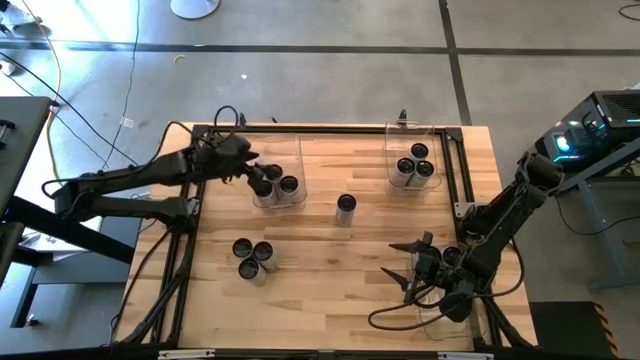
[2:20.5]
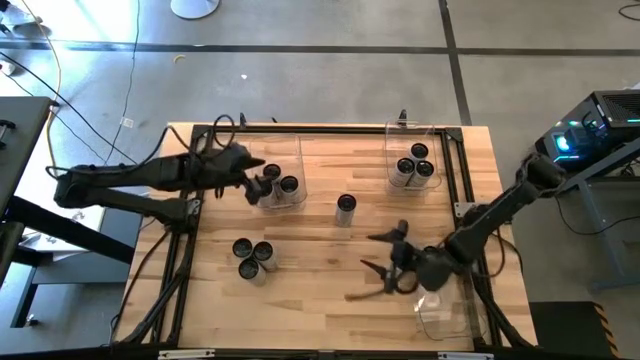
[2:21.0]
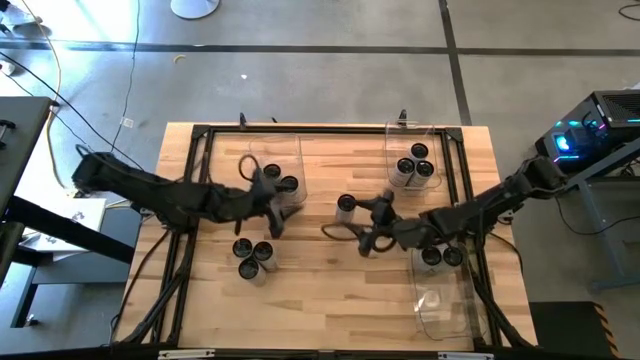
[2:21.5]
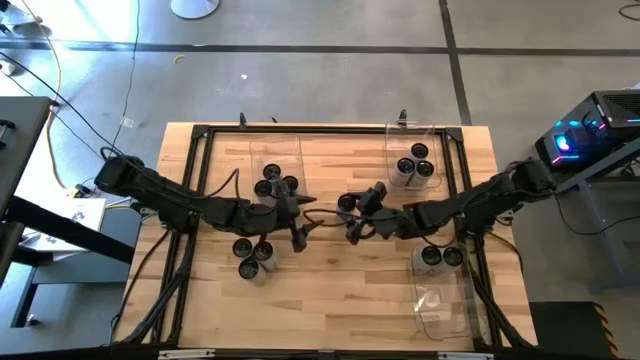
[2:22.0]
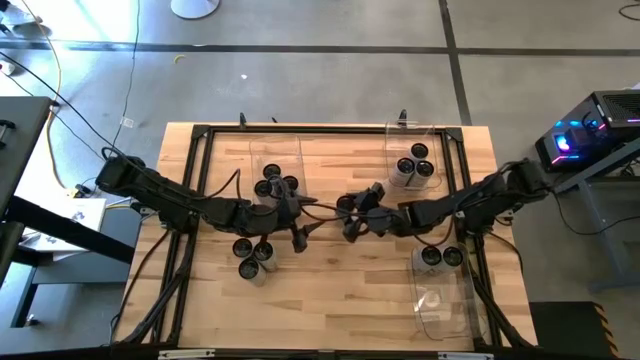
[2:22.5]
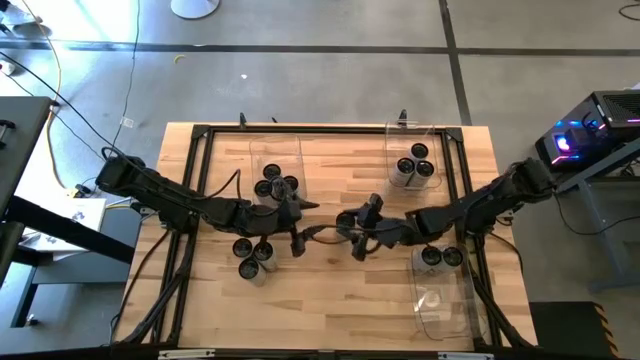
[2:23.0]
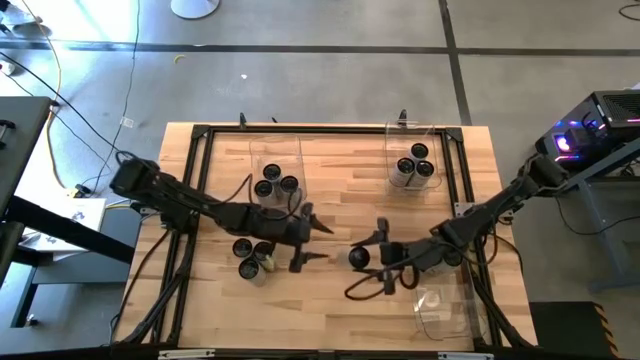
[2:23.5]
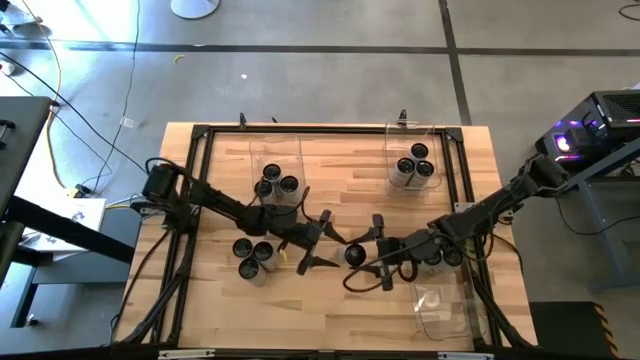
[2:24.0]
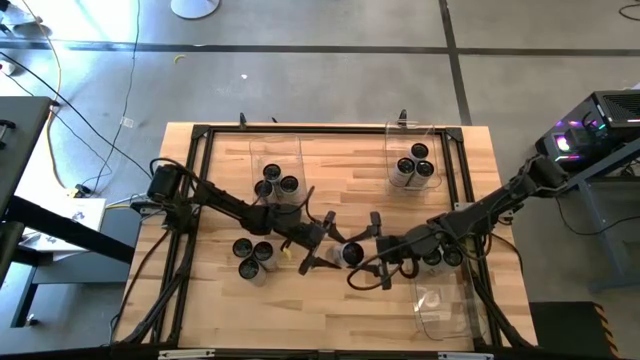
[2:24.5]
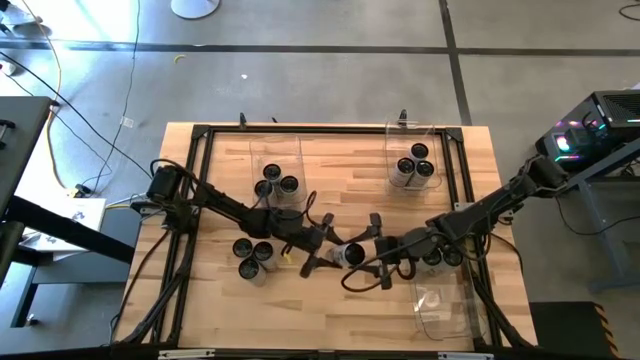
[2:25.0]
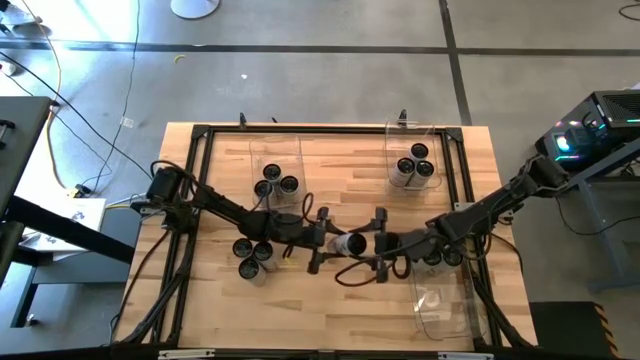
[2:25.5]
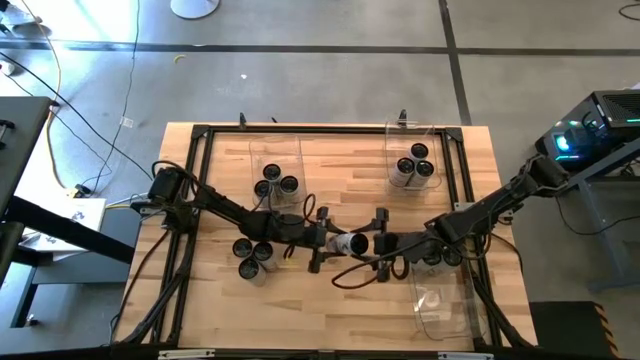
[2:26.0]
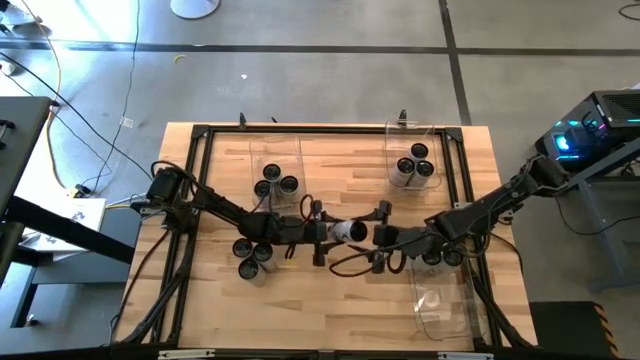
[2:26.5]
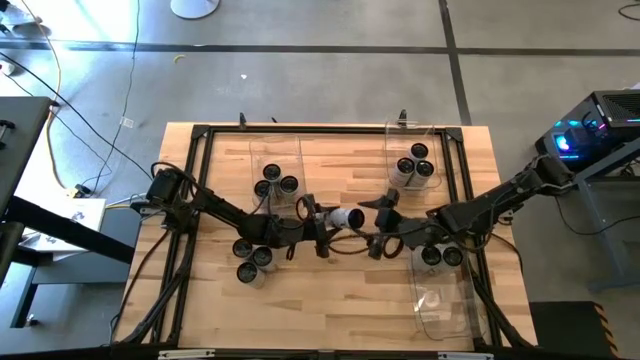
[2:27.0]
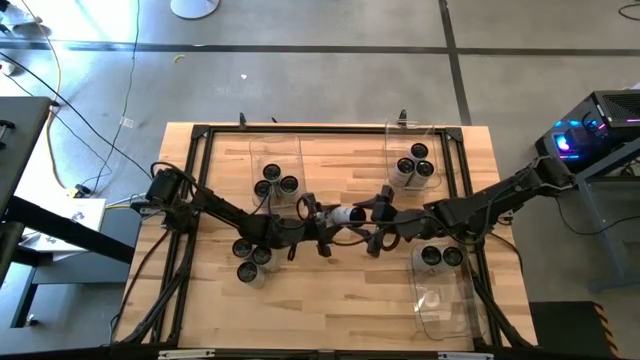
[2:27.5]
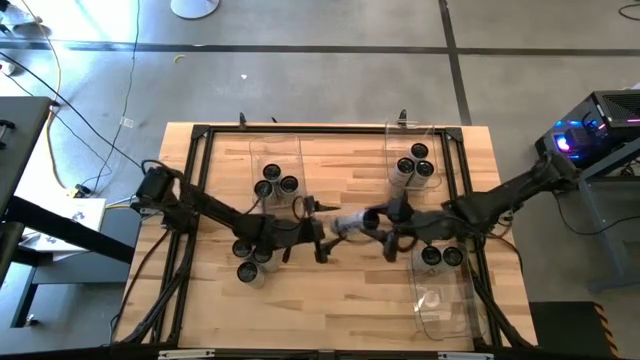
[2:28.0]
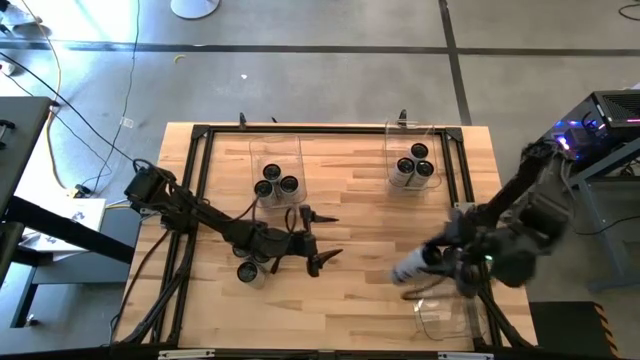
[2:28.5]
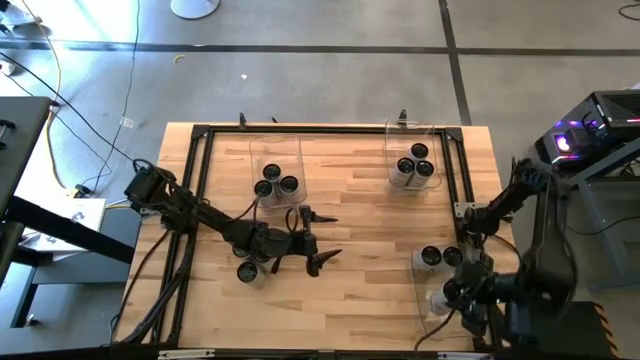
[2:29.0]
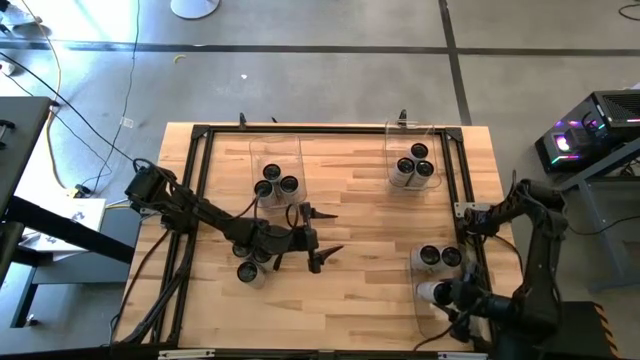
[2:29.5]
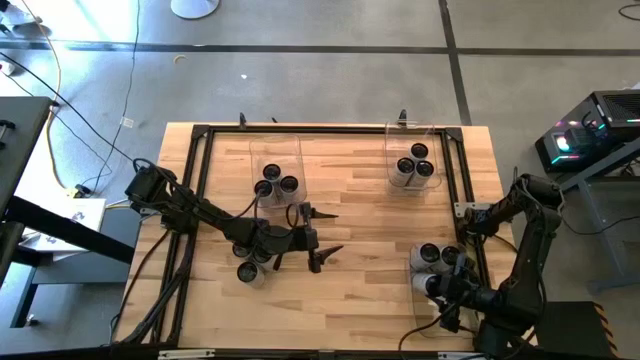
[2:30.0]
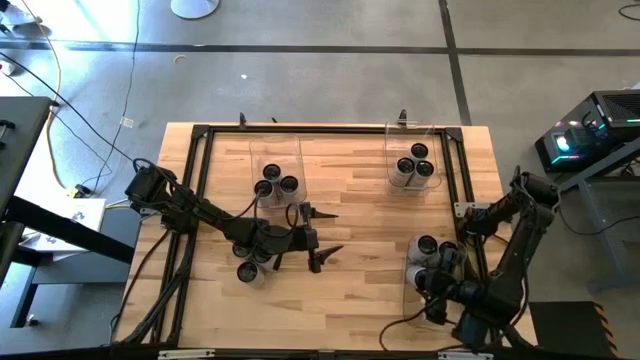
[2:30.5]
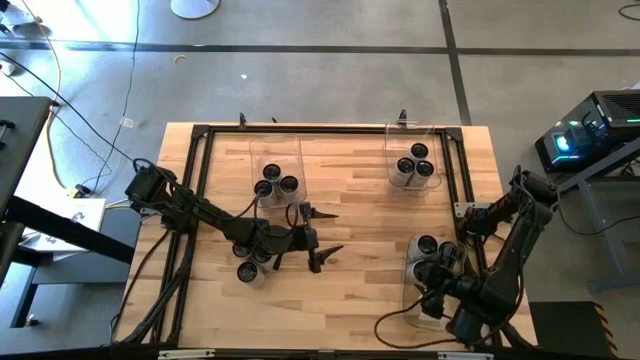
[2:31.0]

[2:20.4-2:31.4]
Task: Sort soda cans
Put the white-blue soda can into the bottom transparent bin

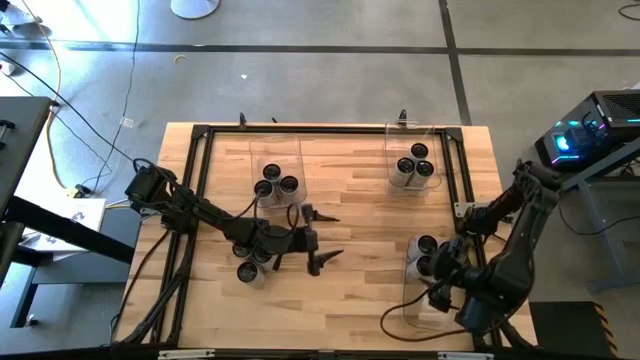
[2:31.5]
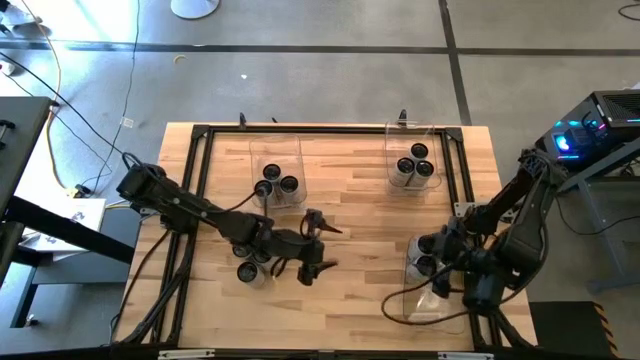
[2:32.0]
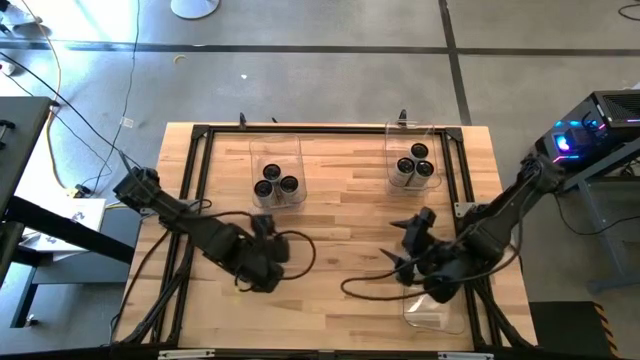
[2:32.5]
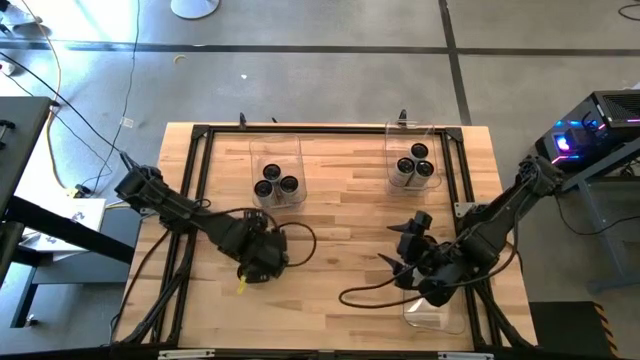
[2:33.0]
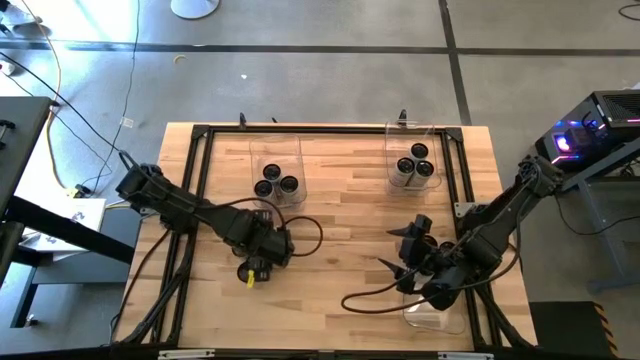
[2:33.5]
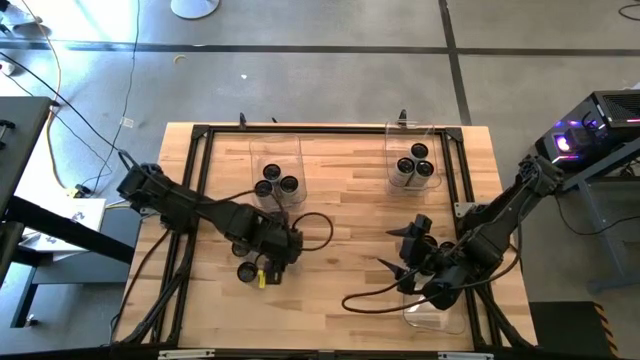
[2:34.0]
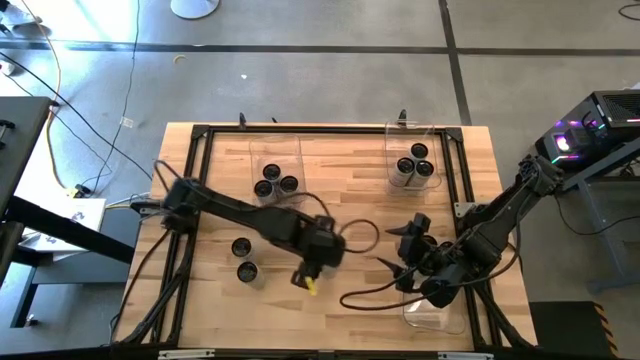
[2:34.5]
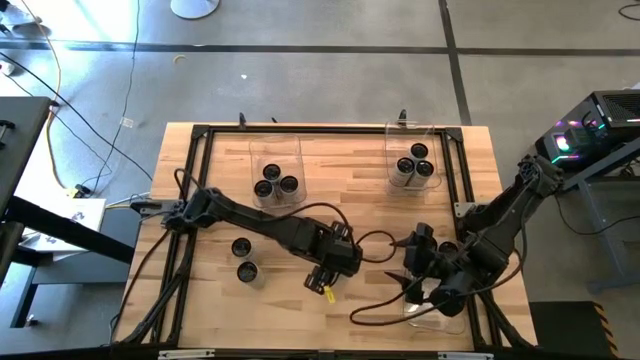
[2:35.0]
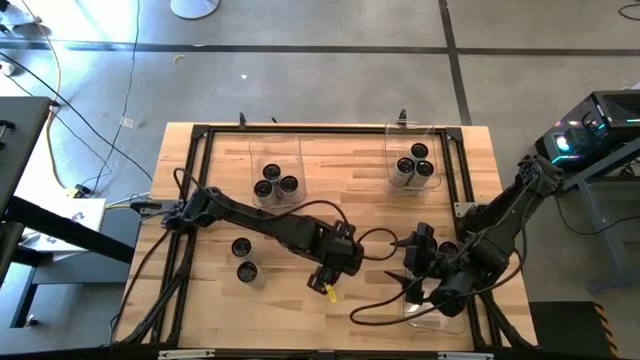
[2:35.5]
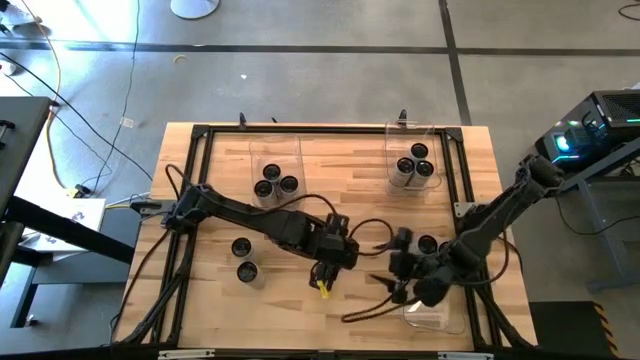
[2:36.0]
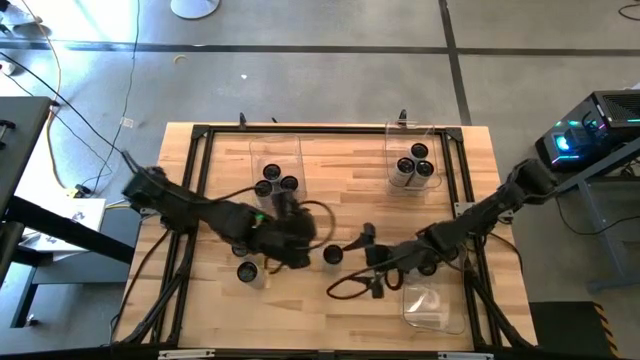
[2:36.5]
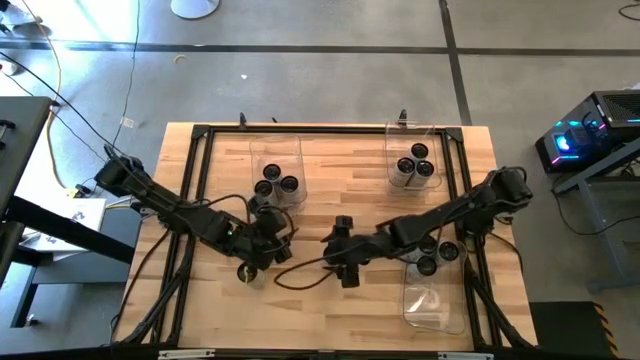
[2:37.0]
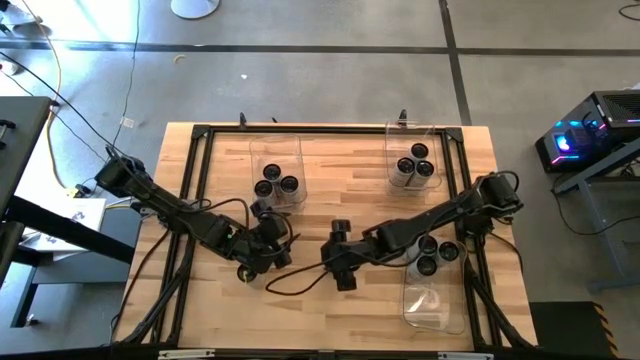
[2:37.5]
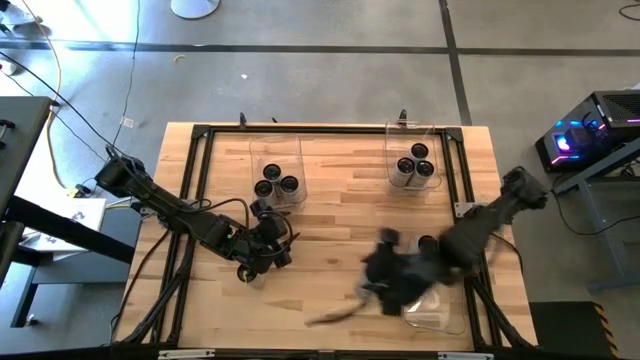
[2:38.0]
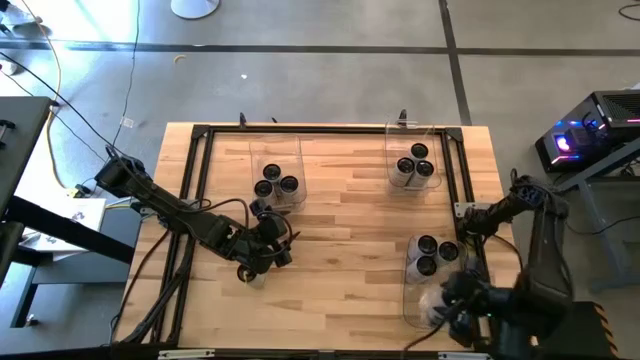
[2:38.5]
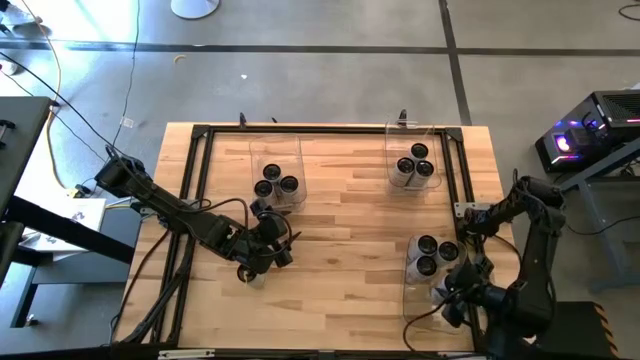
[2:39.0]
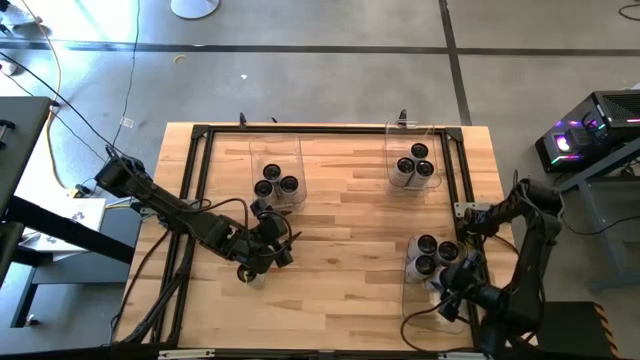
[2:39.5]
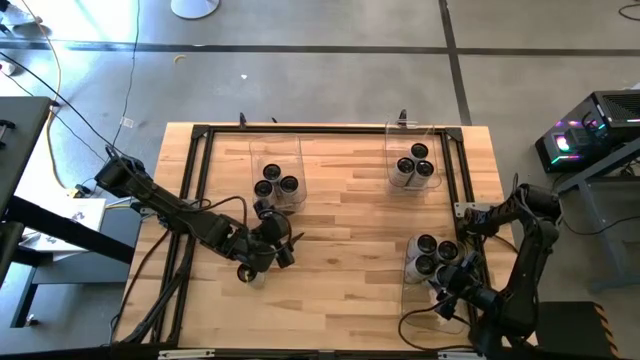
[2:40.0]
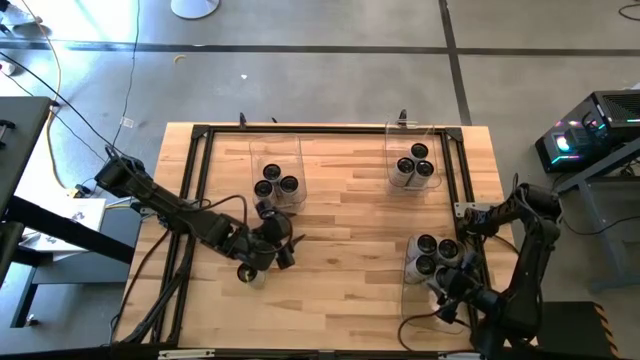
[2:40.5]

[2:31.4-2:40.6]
Put the white-blue soda can into the bottom transparent bin

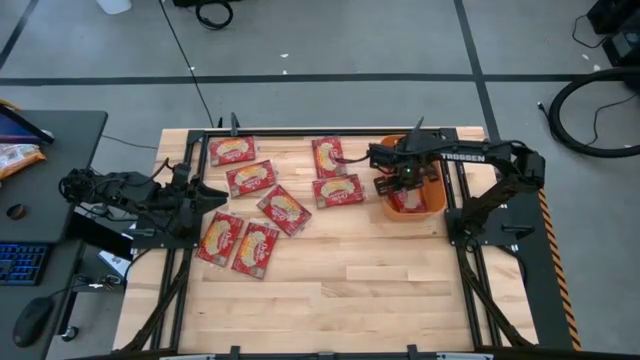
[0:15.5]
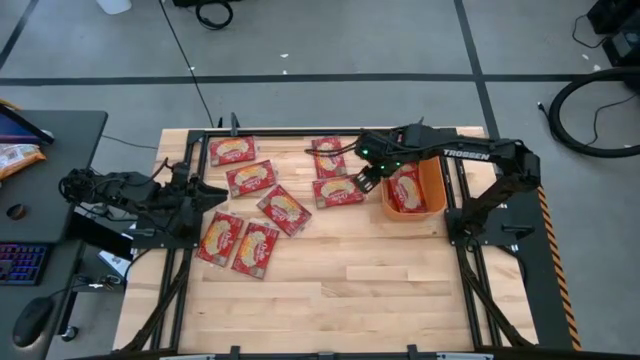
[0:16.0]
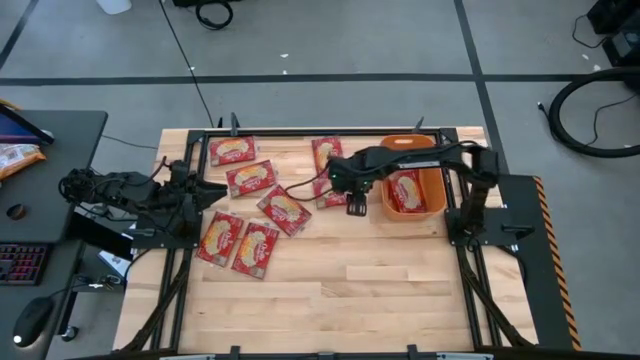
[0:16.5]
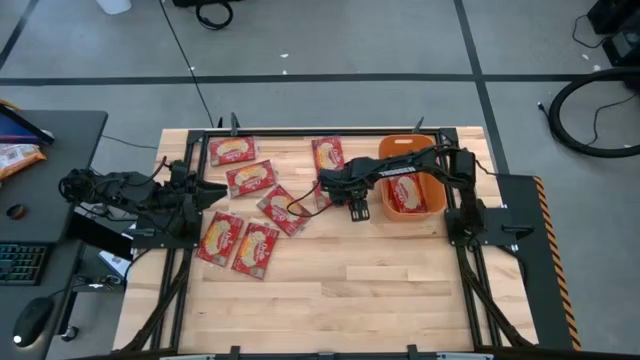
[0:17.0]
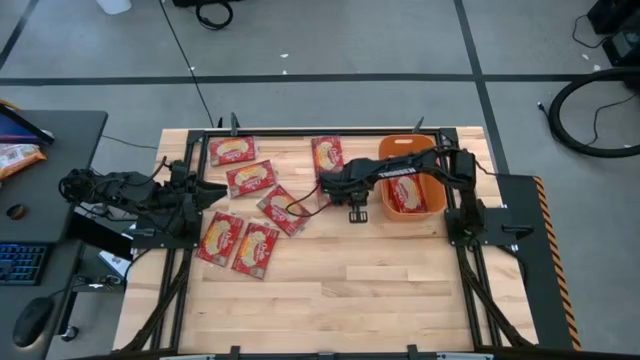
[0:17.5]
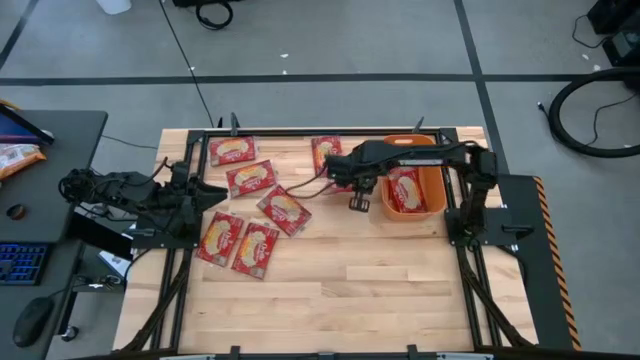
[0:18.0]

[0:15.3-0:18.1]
Task: Sort popcorn bags into baskets
Put the red popcorn bag into the orange bin
